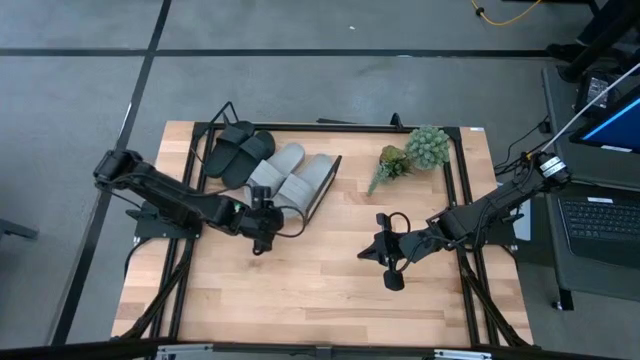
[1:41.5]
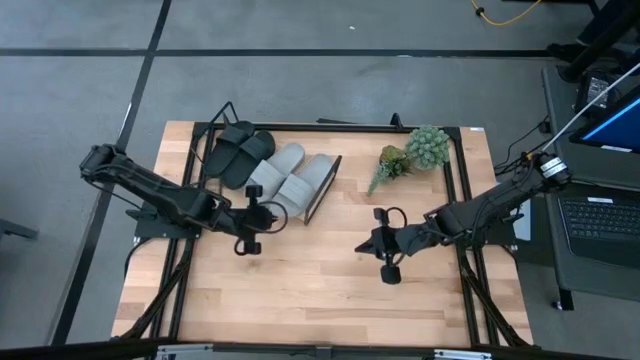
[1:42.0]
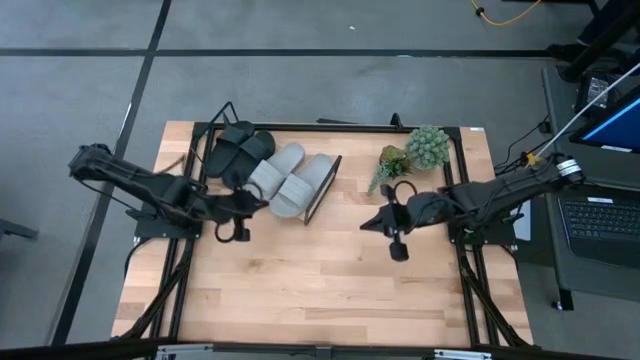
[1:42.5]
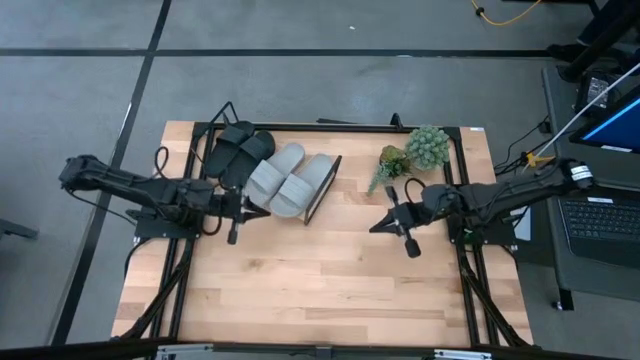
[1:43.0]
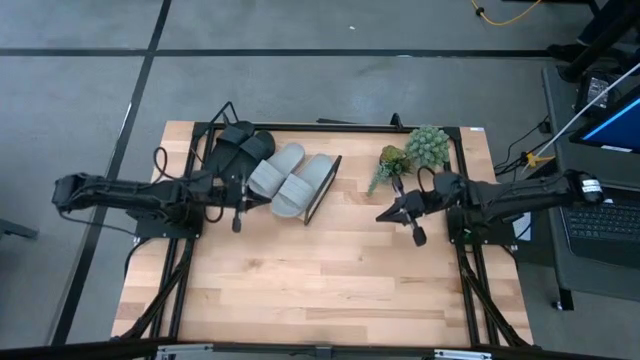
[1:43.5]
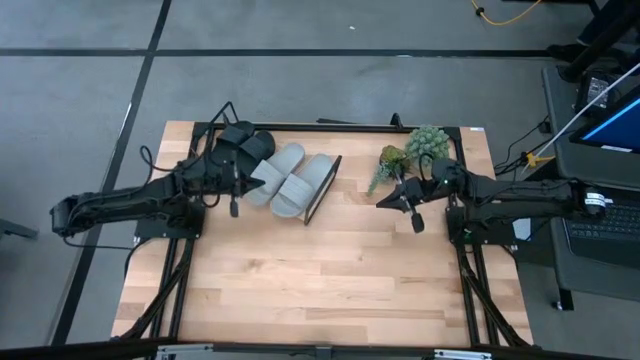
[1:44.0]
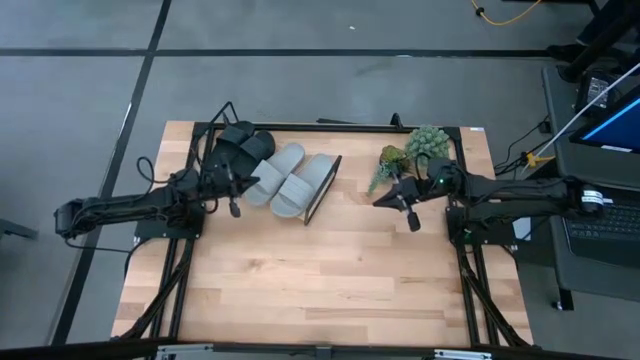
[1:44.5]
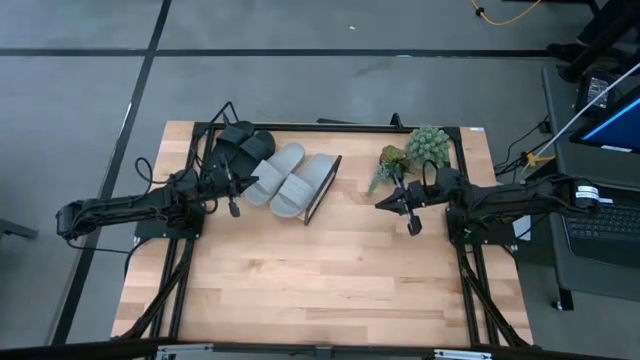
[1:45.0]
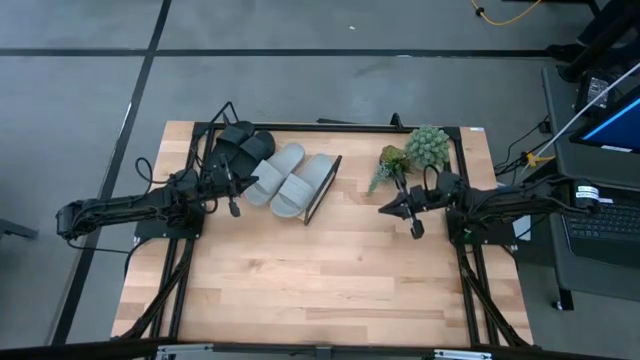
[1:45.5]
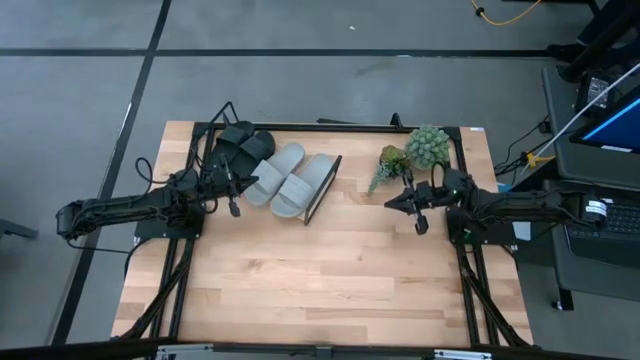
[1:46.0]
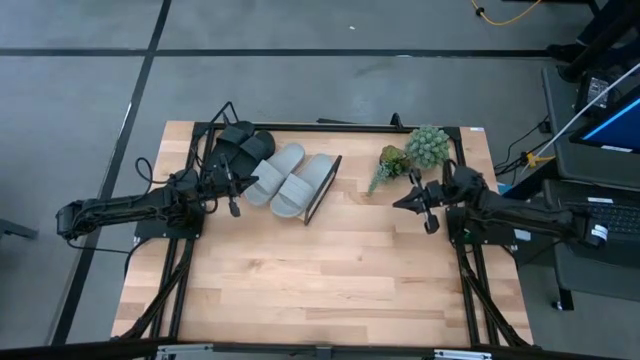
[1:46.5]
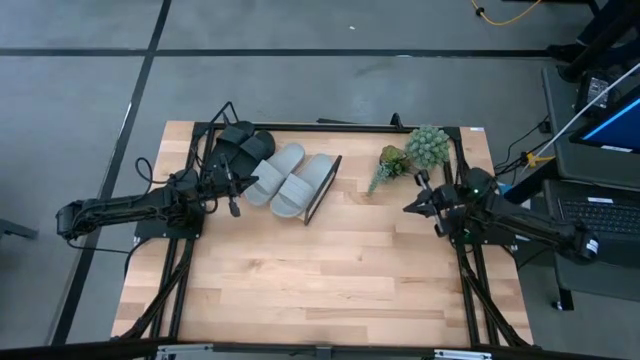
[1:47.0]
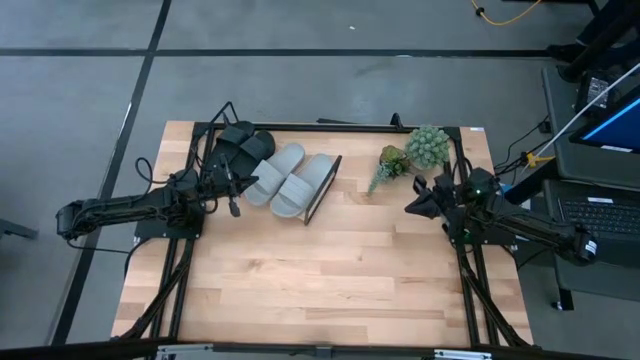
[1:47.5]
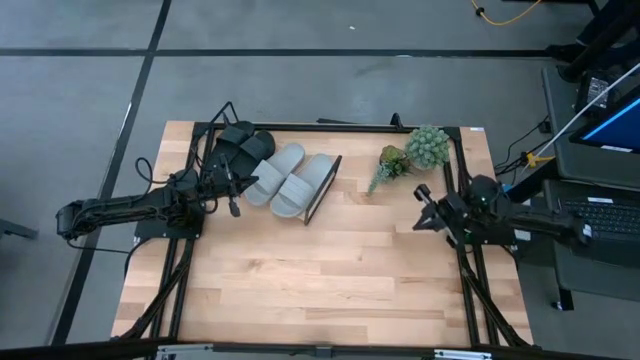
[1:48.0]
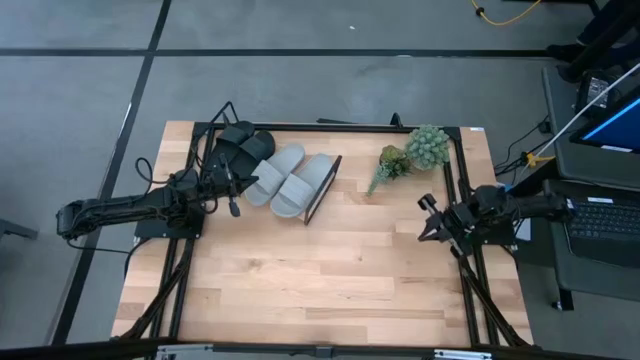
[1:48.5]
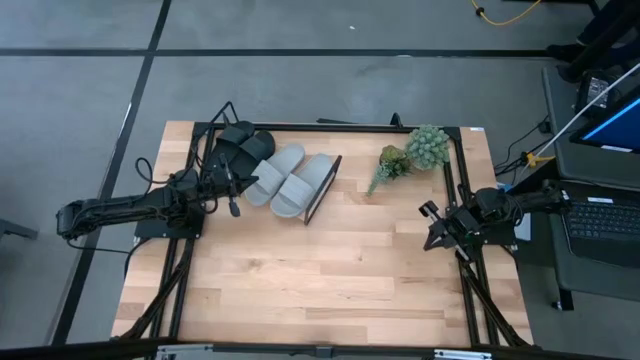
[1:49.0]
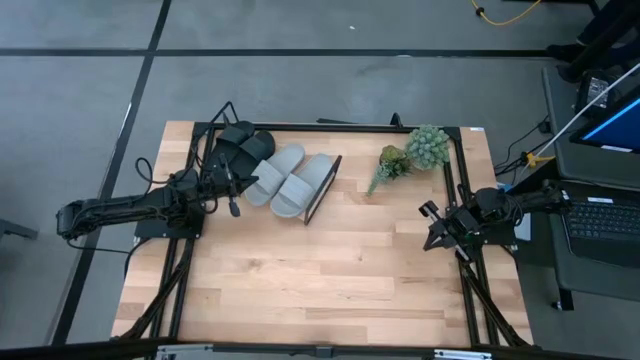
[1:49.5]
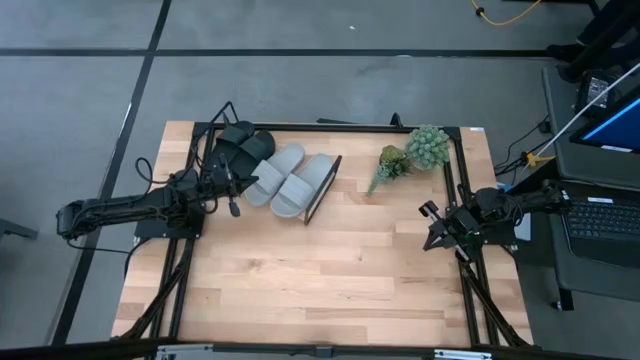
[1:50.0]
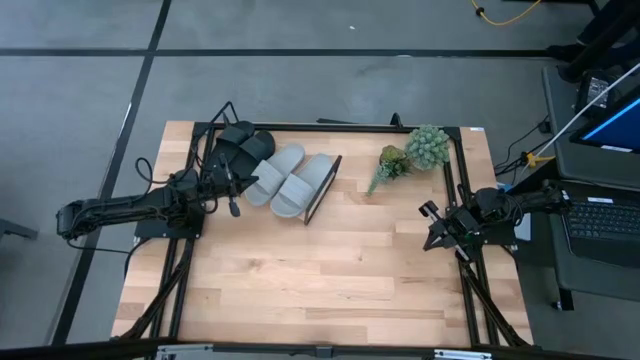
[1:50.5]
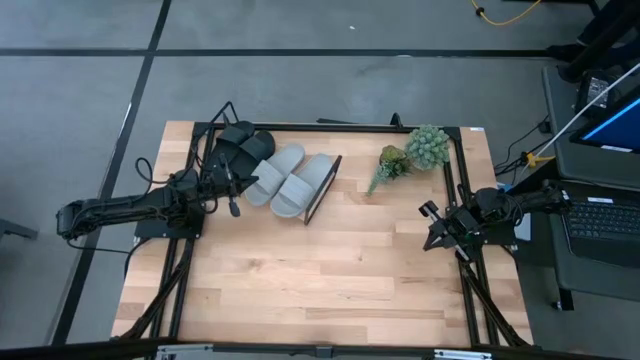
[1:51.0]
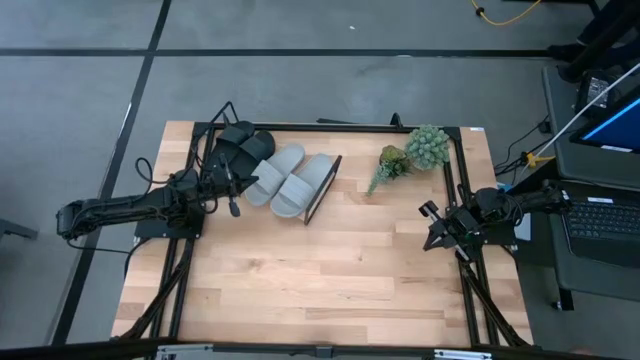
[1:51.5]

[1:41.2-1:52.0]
Task: Pick and place slides into the shelf
Return to Home Position

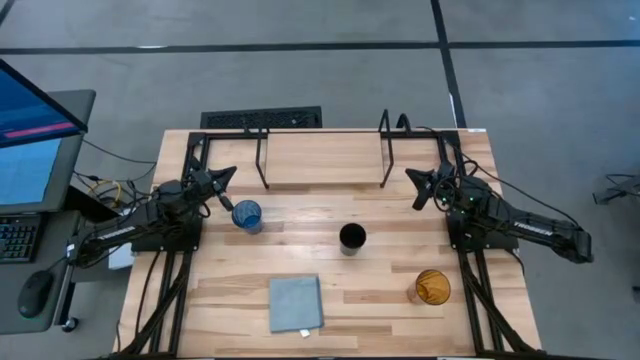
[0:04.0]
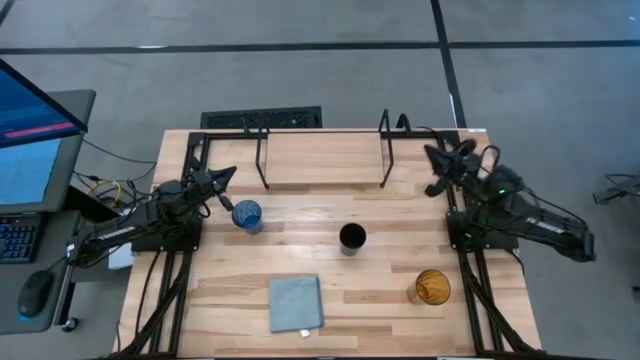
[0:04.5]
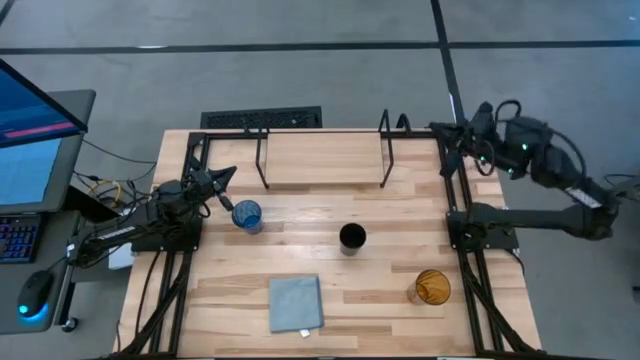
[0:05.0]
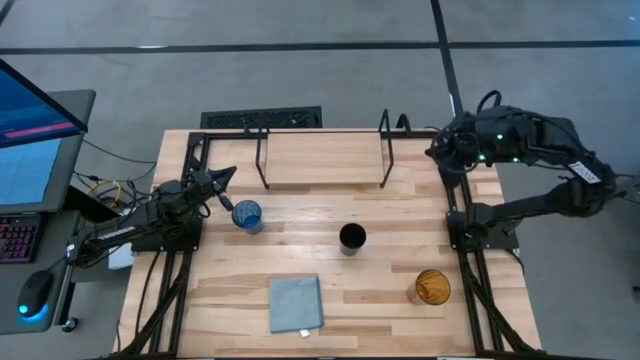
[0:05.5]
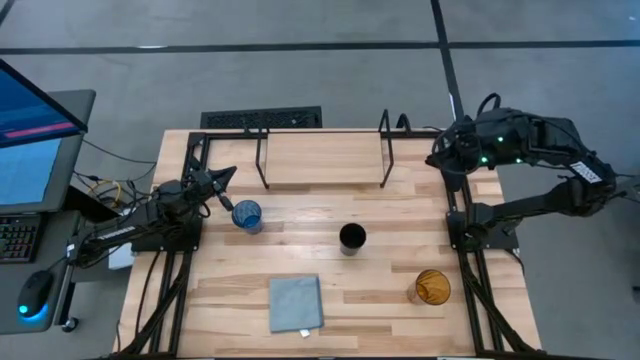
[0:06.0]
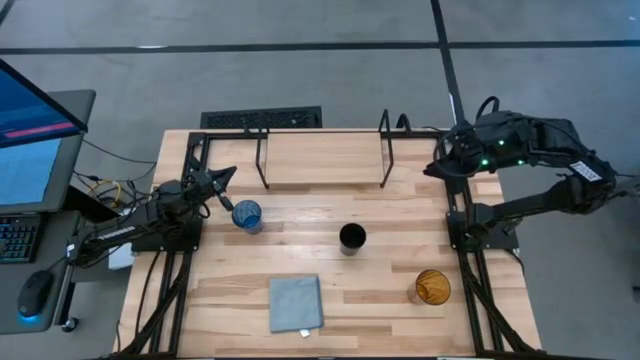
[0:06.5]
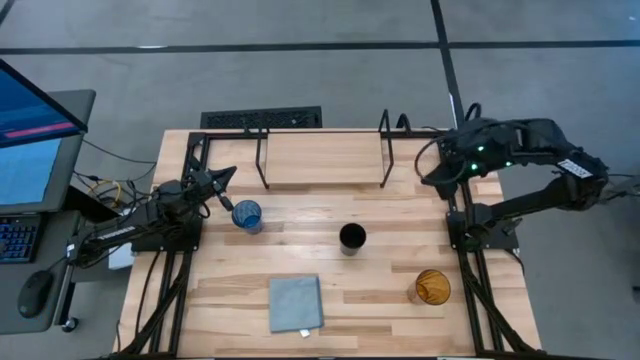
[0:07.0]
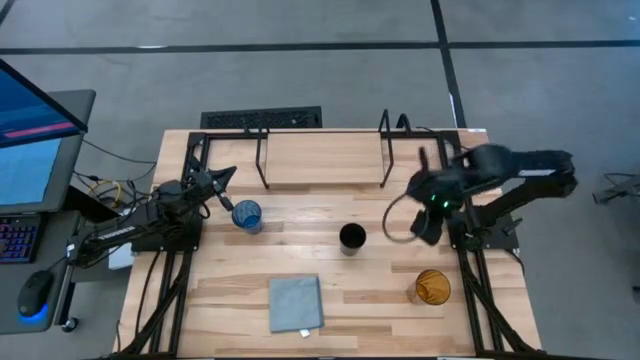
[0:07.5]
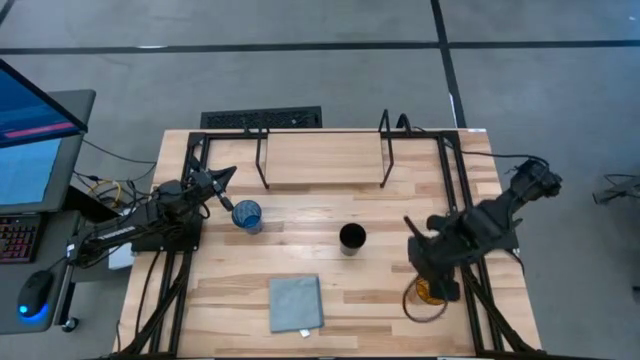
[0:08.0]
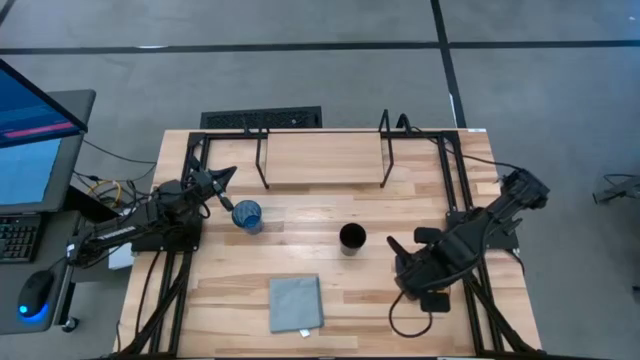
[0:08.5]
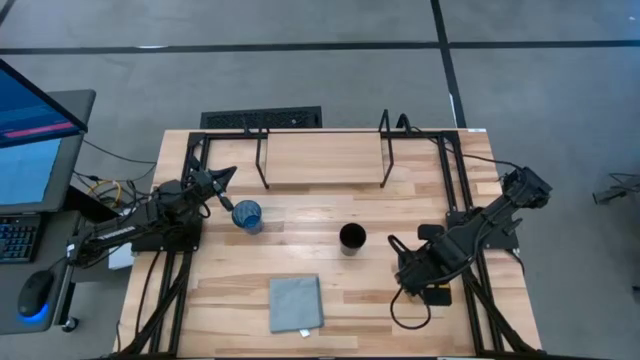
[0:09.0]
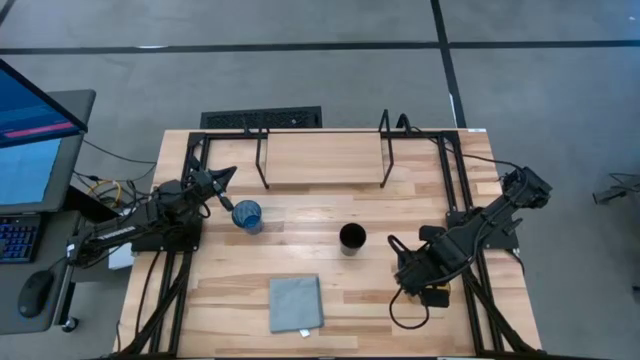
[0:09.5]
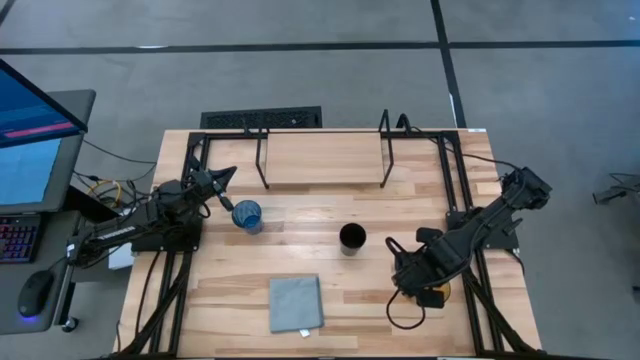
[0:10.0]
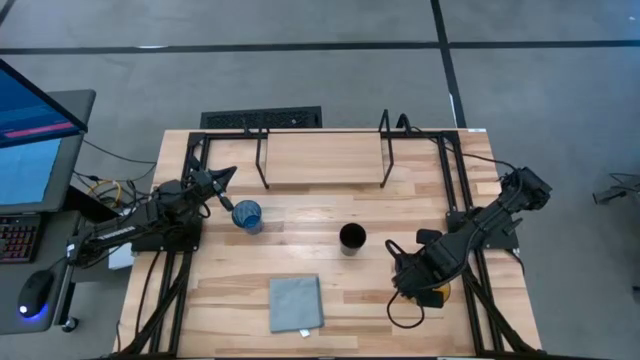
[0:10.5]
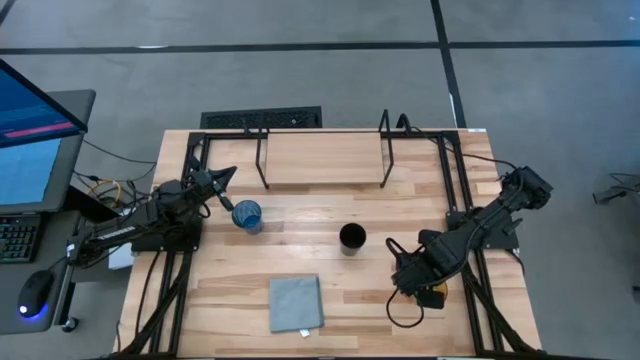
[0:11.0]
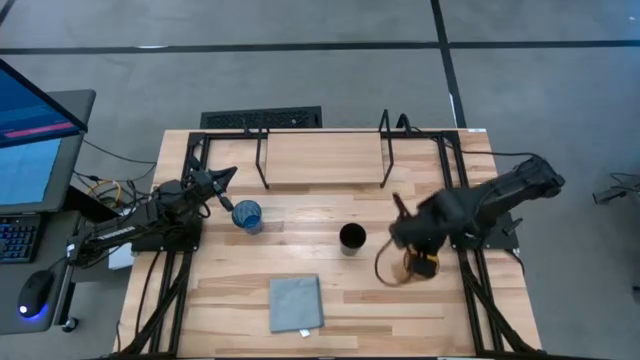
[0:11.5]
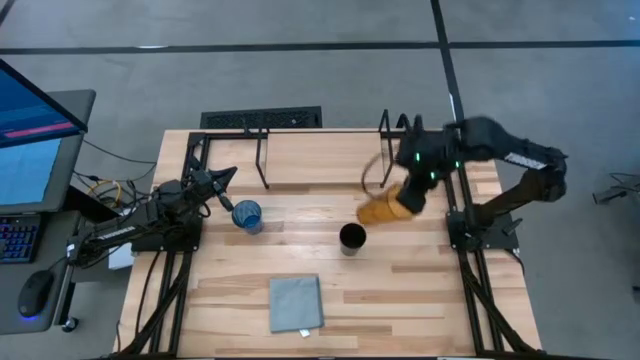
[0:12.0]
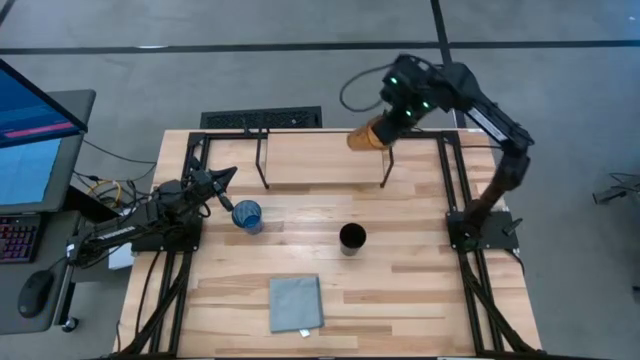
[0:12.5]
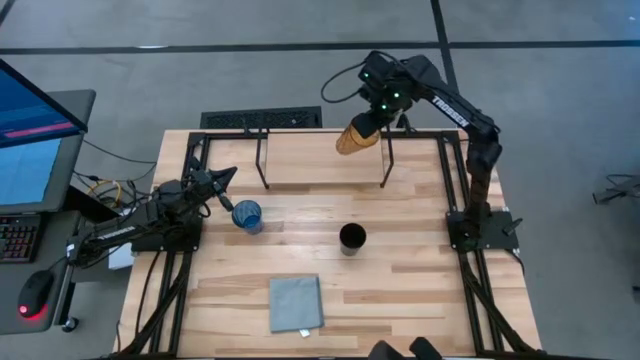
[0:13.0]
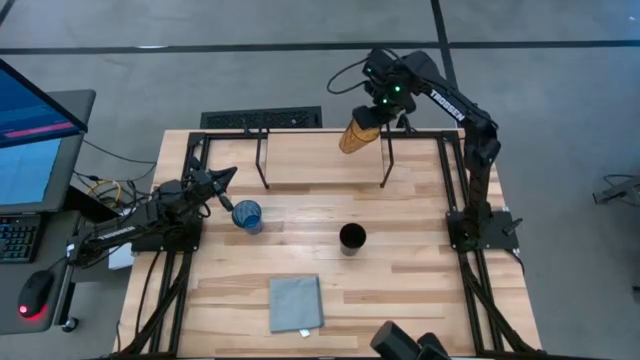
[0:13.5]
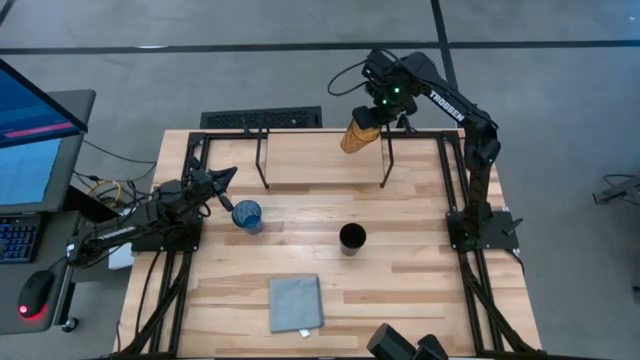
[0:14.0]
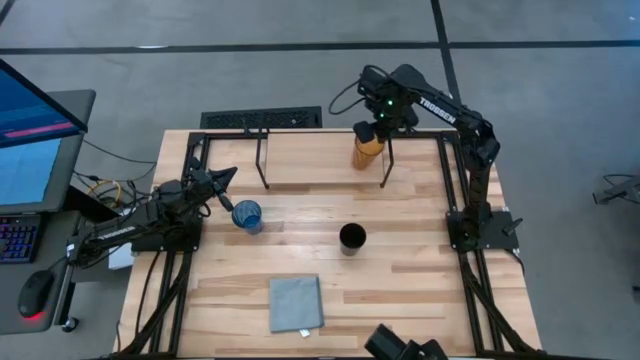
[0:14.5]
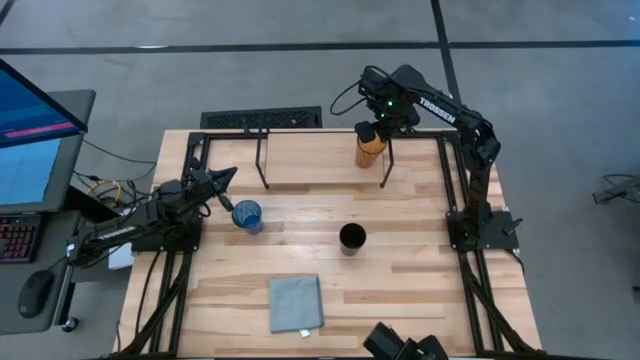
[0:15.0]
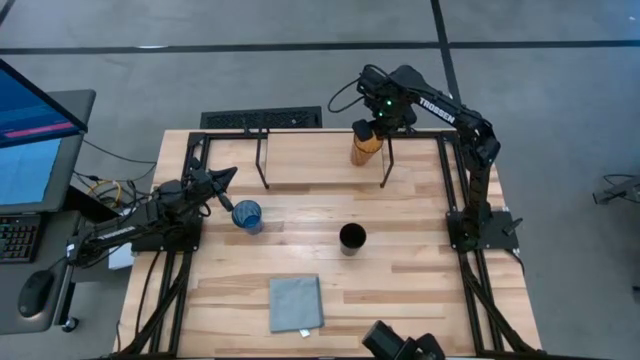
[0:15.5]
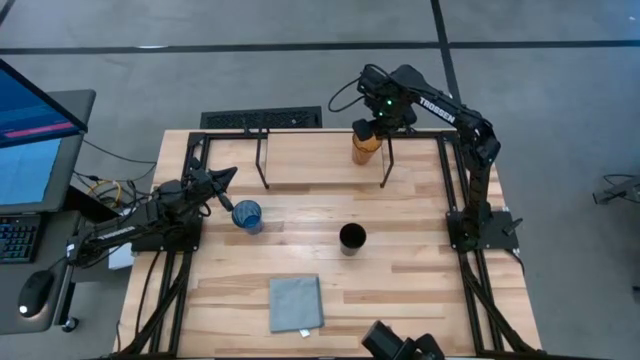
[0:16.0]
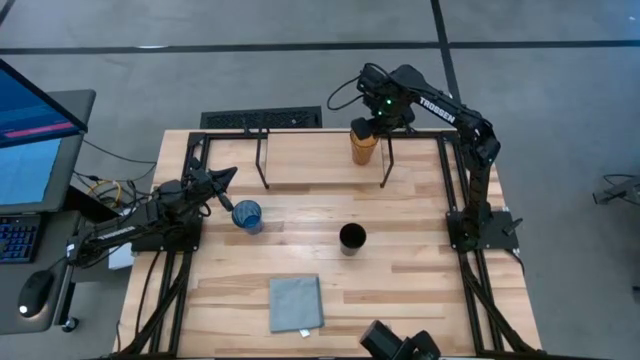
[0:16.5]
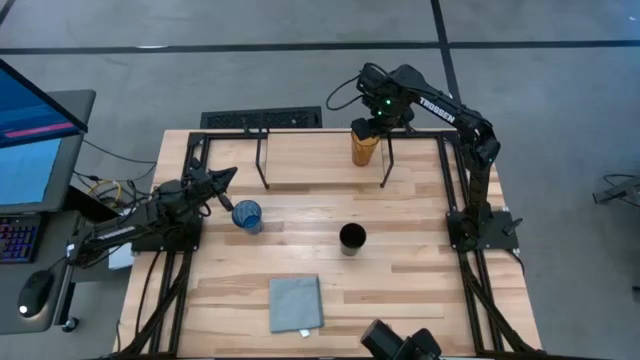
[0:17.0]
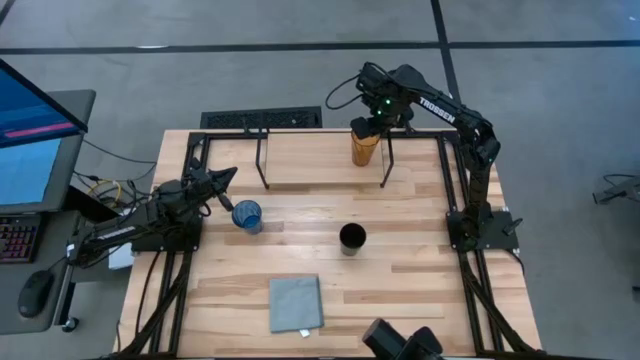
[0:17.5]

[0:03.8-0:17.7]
Task: Stack small to large cups/mugs on shelf
Put the brown glass on the shelf
